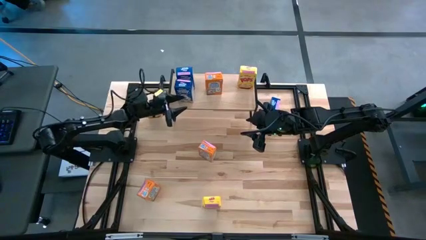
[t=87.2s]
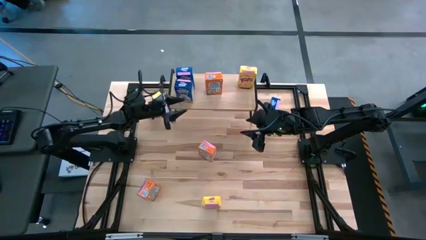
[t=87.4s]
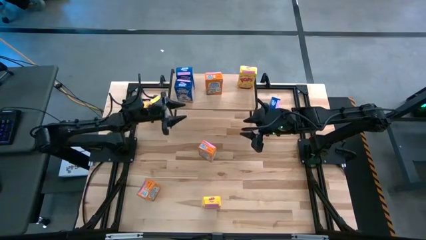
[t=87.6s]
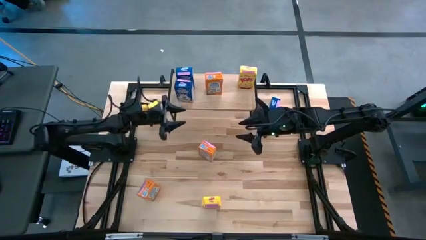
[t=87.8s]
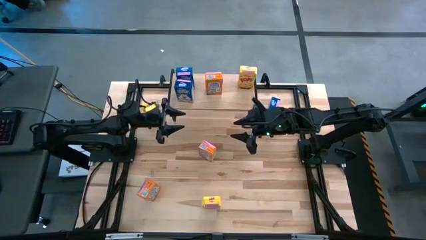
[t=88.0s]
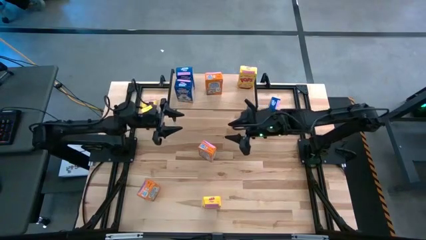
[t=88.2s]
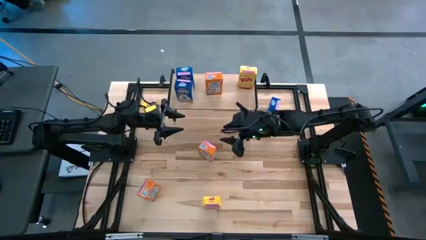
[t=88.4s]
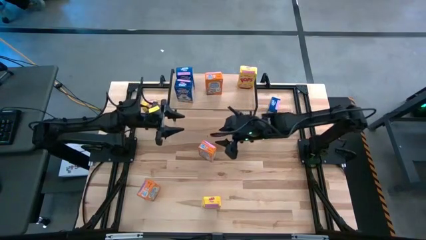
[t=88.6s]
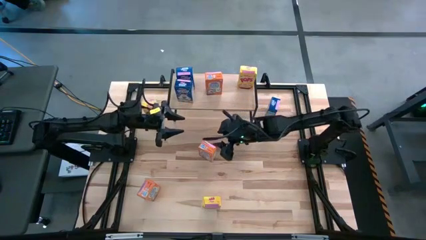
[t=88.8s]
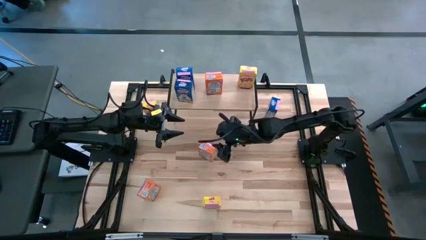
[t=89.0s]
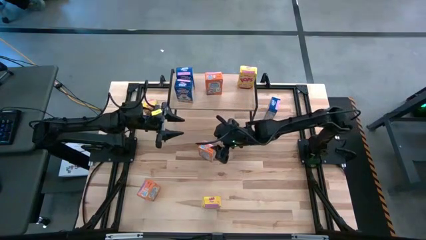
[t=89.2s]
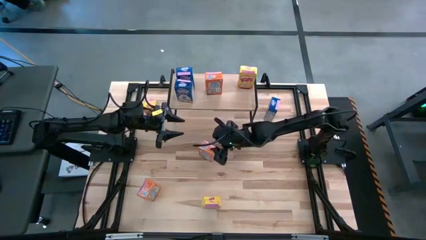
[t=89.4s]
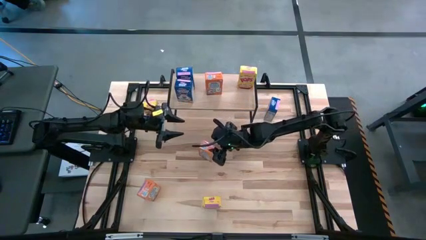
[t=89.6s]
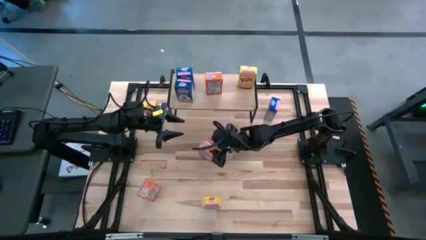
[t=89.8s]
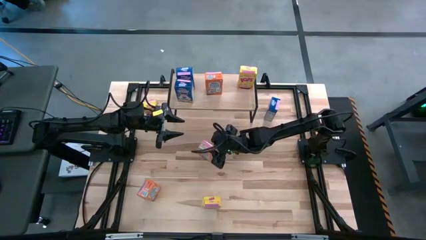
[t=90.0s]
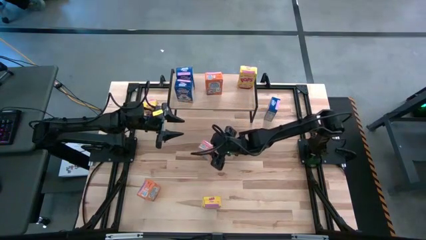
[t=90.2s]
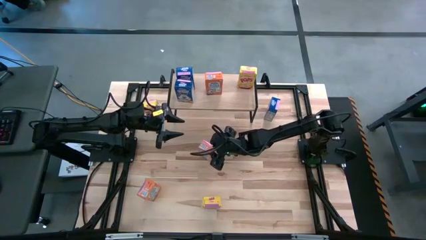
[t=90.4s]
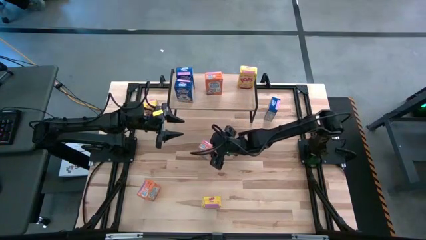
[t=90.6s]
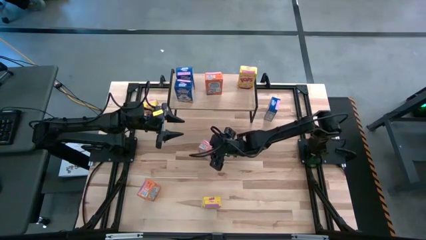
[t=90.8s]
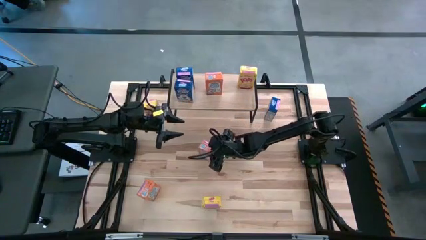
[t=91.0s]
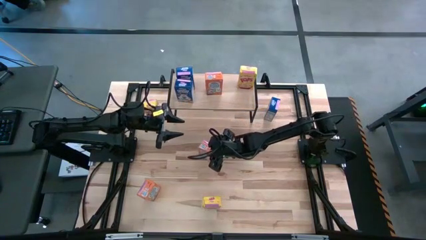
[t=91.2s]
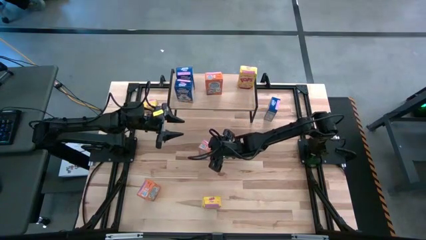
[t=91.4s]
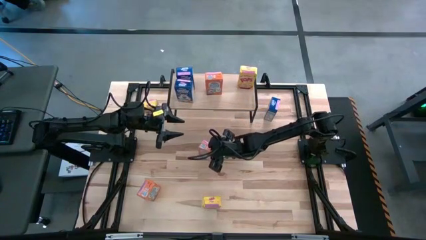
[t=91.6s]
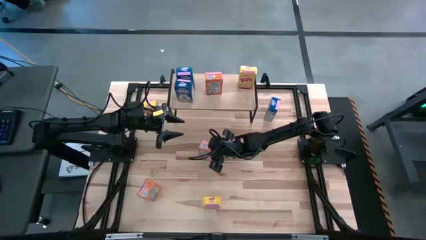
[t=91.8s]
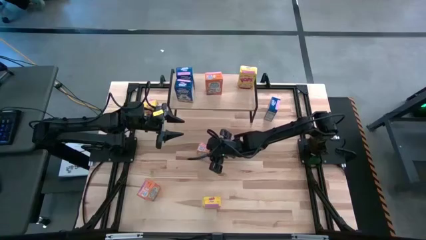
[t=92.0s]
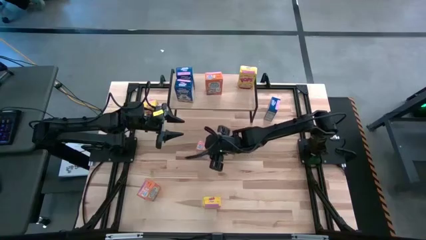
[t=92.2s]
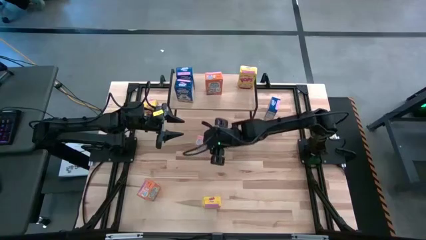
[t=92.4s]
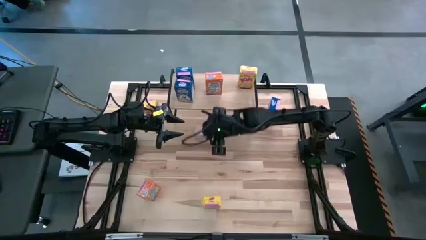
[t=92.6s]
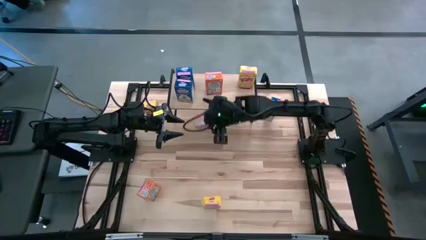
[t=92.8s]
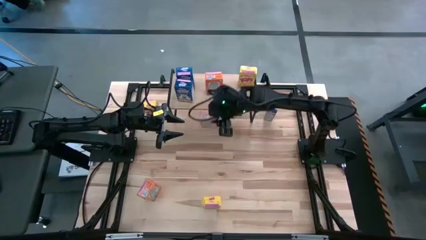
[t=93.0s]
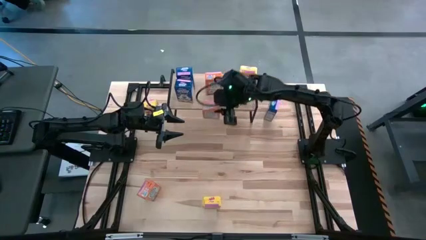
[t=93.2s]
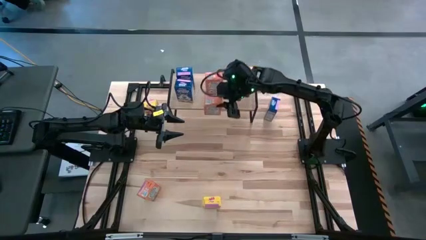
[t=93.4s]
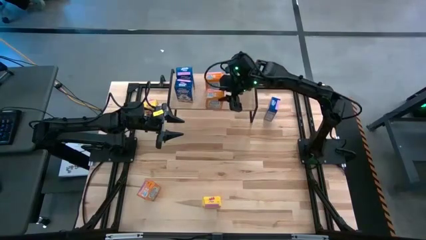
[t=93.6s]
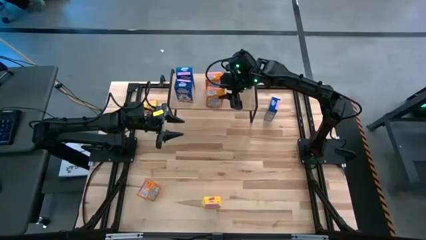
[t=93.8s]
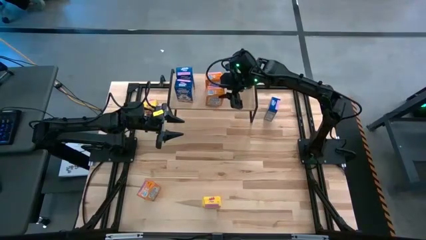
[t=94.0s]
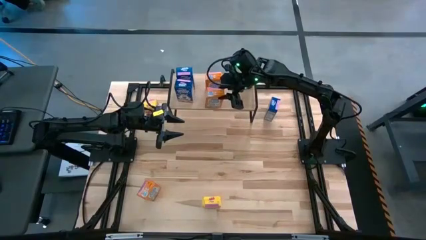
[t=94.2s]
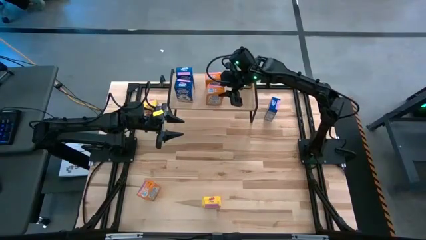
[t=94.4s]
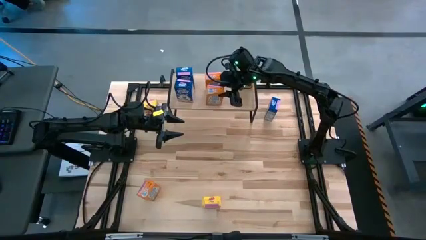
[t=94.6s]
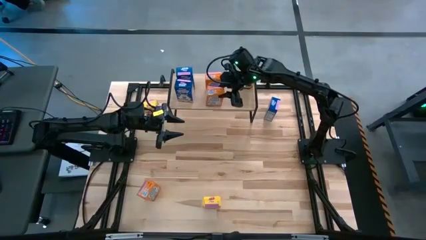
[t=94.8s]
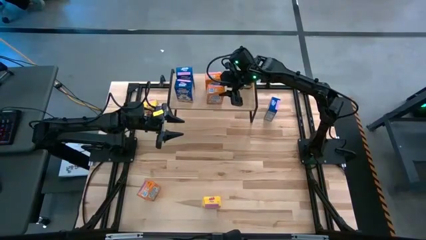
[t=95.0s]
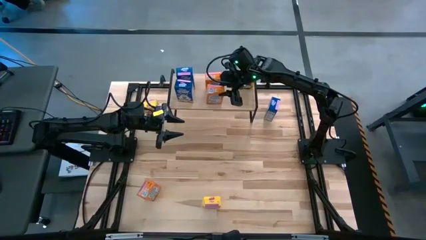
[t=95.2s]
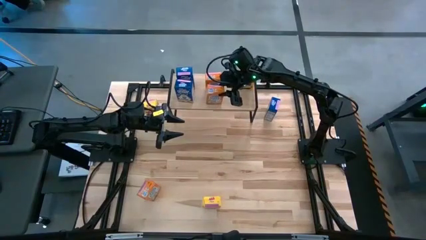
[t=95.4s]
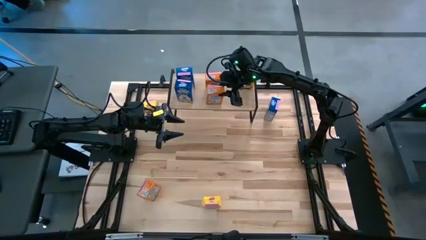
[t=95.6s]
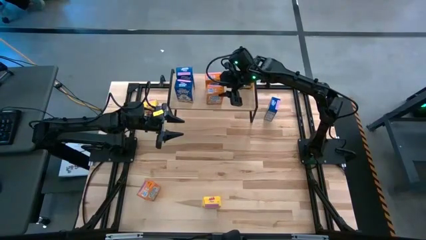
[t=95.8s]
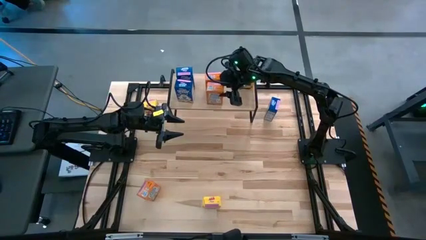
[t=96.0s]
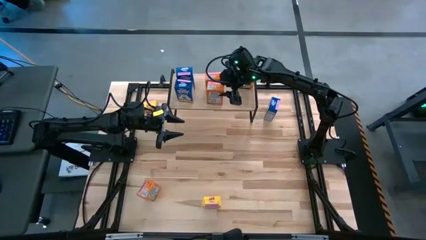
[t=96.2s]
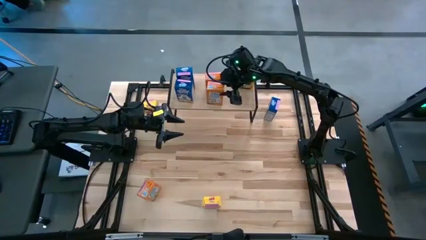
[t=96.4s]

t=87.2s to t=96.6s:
Task: Stack cereal on shelf
Put the top orange cereal box aligned with the other orange cereal box on the shelf

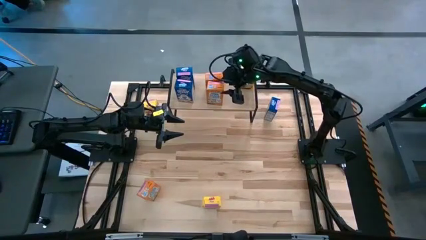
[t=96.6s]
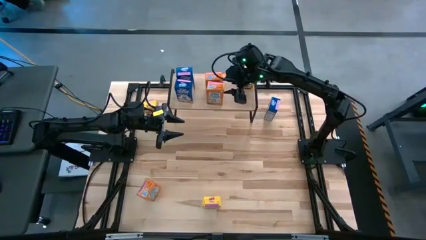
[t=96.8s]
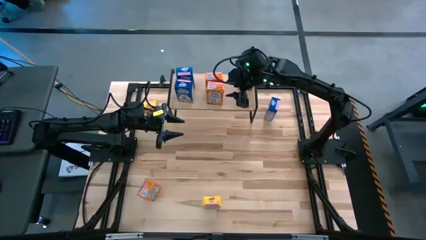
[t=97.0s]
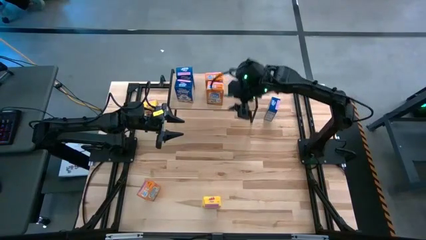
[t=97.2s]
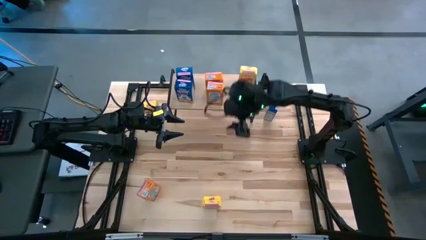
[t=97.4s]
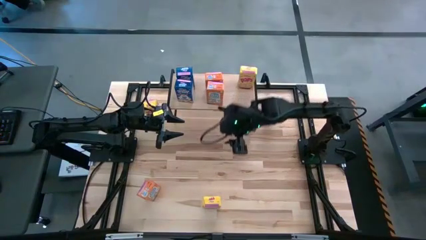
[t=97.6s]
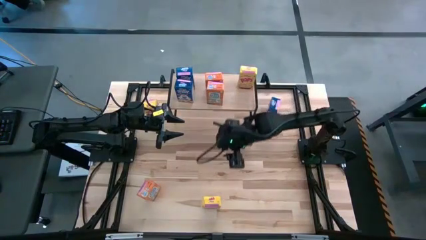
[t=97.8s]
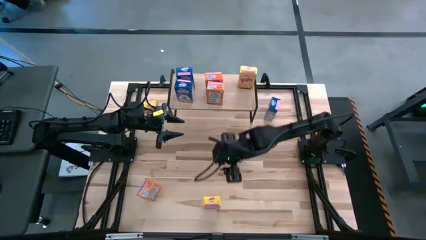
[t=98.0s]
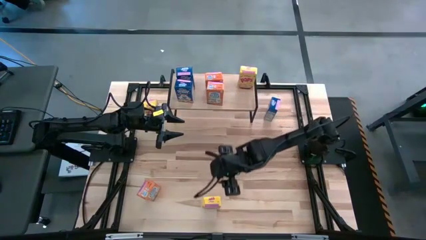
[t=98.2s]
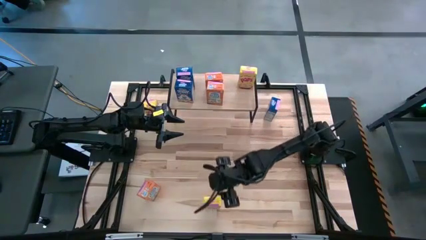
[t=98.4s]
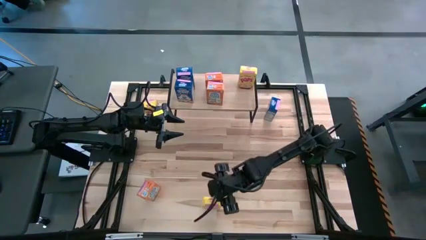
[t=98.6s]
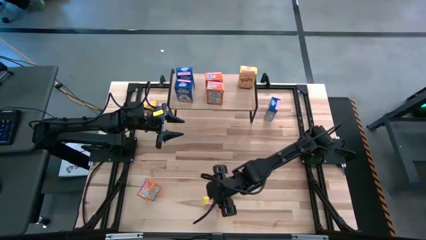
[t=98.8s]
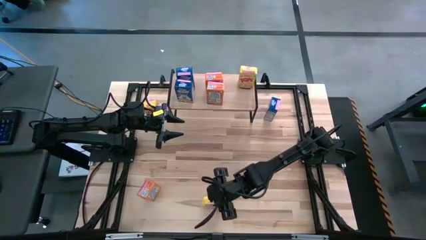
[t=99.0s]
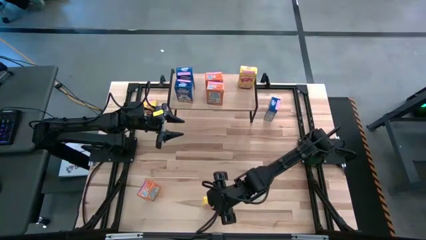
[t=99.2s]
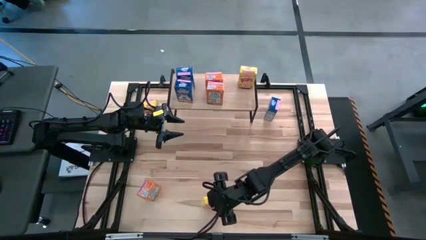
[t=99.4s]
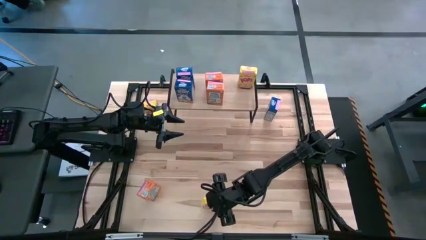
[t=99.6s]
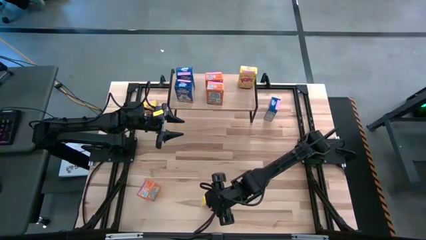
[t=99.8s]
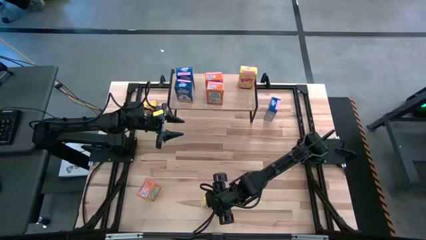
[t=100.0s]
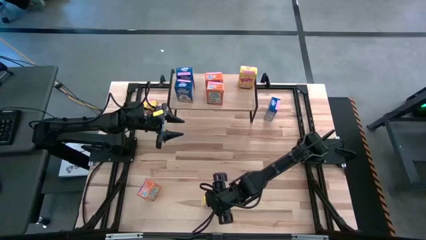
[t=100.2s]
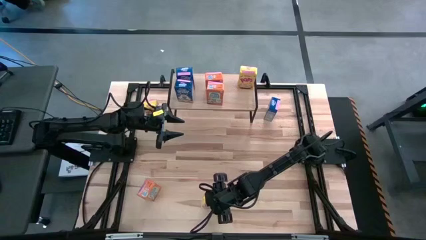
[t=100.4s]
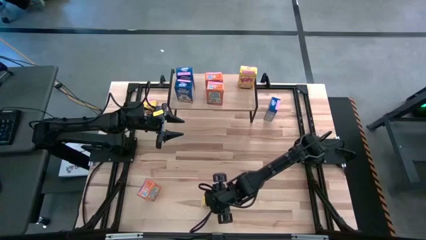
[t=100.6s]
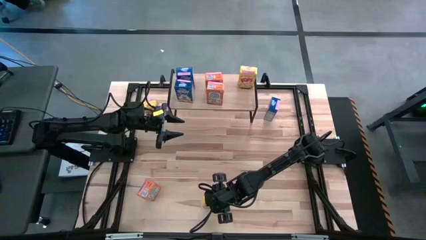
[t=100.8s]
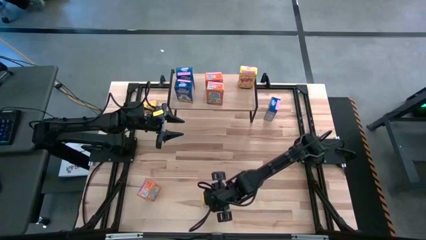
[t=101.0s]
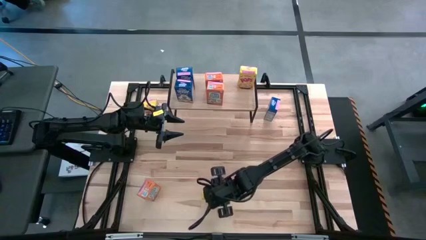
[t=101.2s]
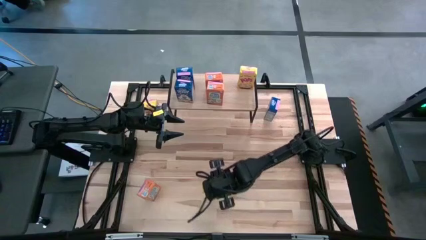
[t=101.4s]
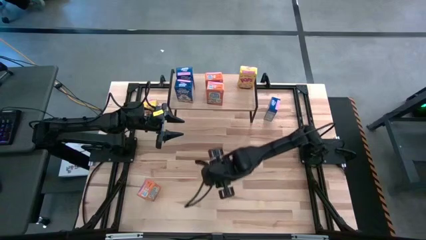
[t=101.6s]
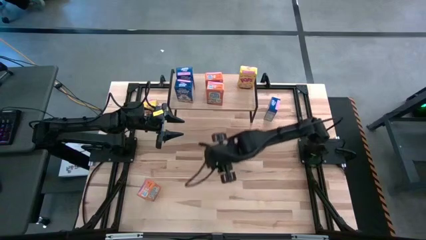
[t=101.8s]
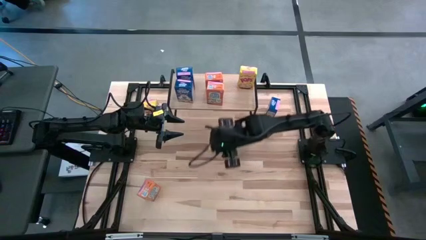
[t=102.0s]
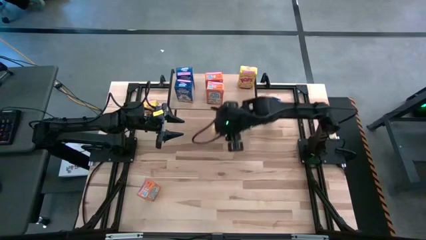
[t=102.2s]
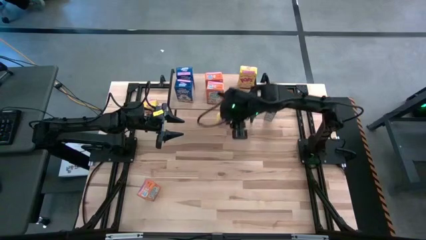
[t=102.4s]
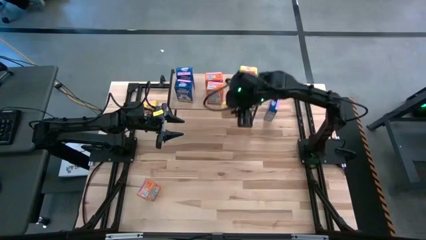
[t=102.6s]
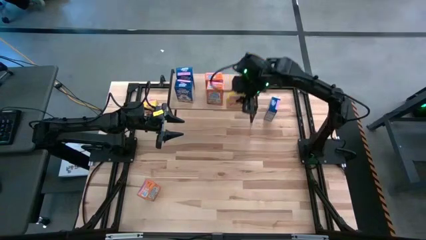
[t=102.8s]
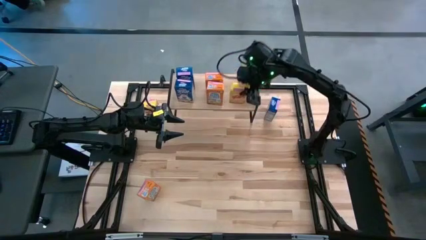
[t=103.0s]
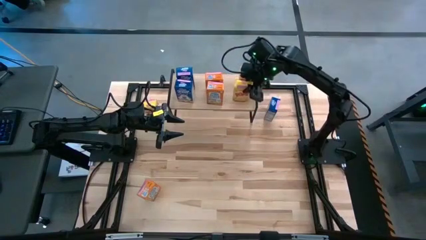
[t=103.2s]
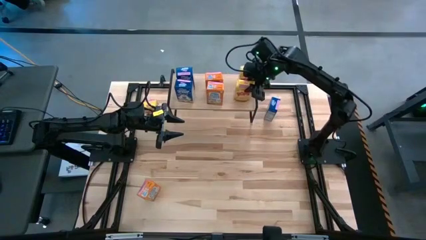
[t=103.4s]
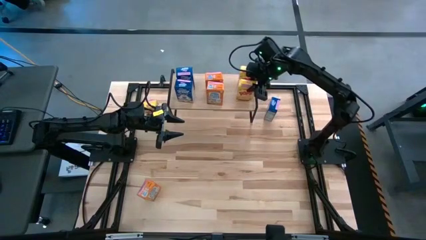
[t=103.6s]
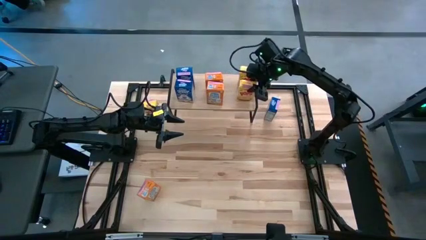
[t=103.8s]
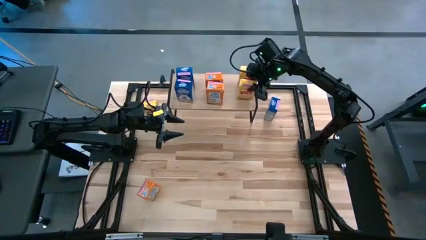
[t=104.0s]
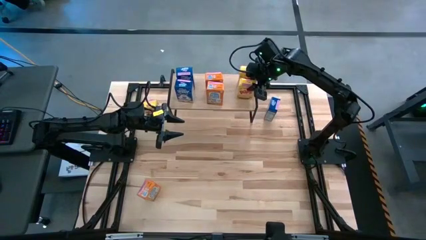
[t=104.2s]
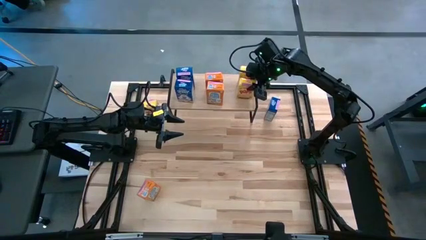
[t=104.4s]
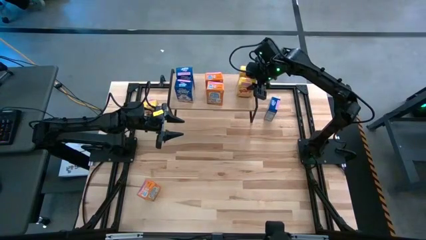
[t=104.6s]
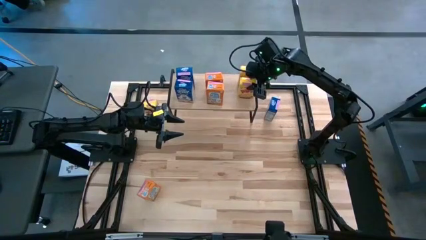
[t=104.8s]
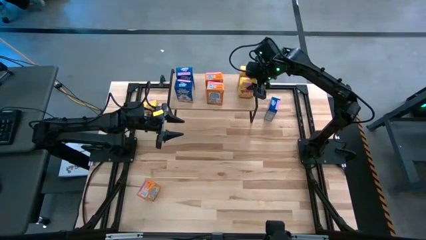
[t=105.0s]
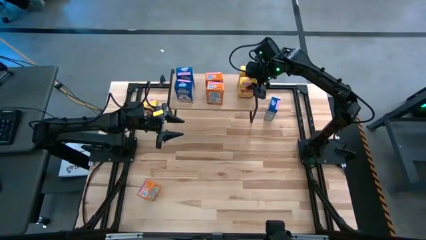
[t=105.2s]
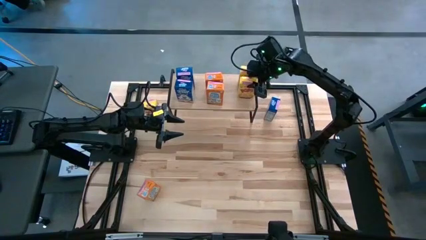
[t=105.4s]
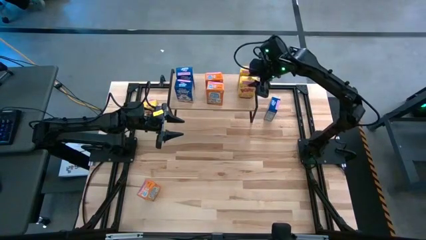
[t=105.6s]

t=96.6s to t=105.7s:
Put the bottom yellow cereal box aligned with the other yellow cereal box on the shelf
